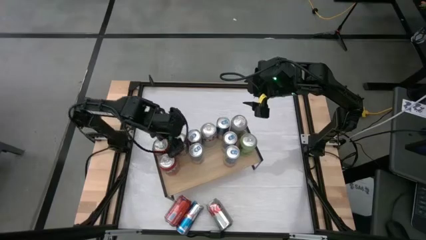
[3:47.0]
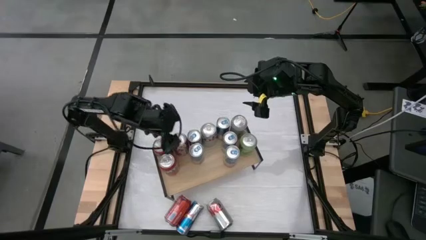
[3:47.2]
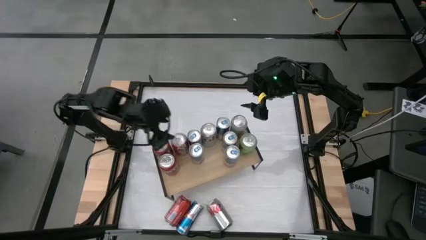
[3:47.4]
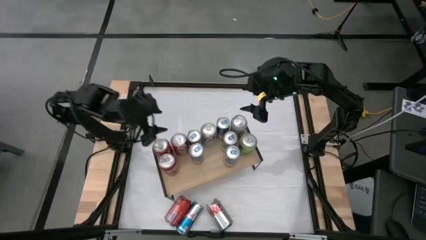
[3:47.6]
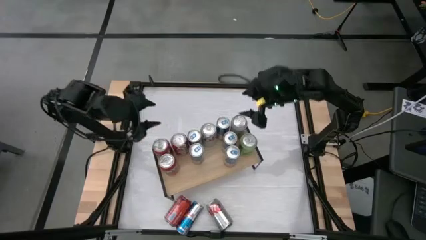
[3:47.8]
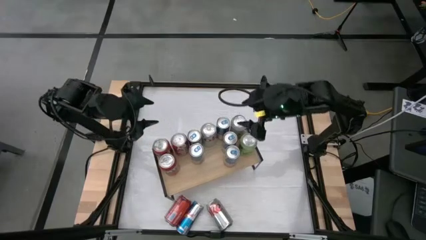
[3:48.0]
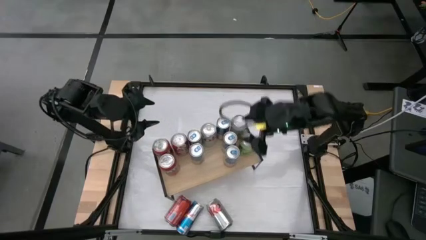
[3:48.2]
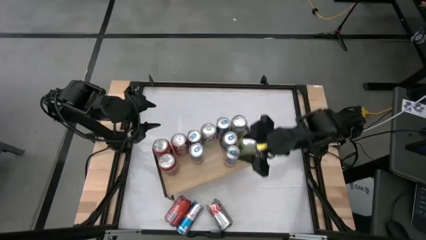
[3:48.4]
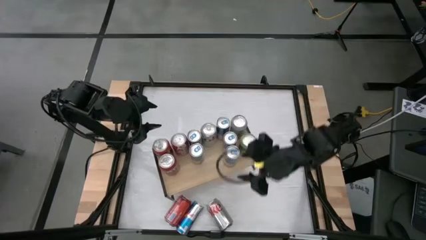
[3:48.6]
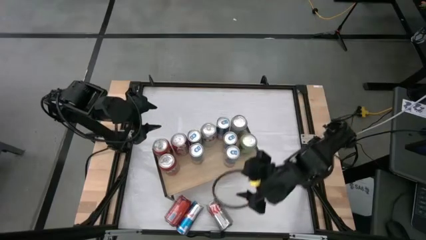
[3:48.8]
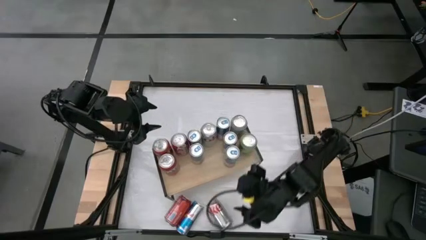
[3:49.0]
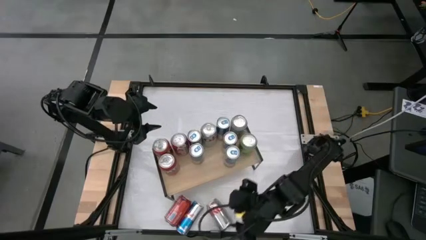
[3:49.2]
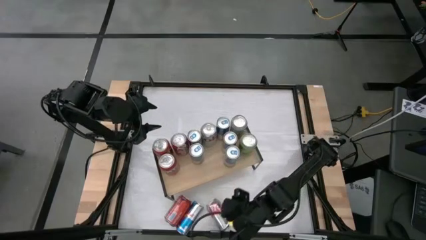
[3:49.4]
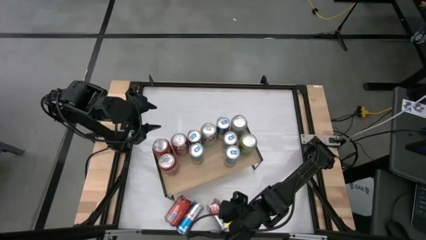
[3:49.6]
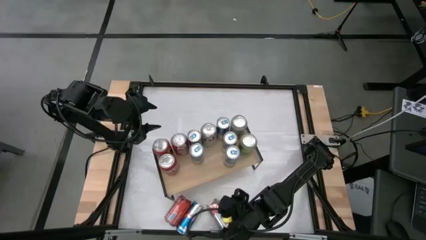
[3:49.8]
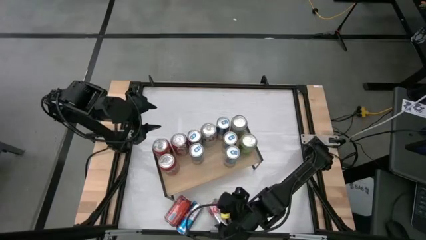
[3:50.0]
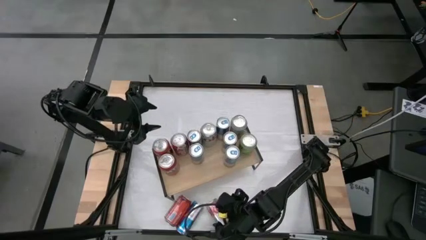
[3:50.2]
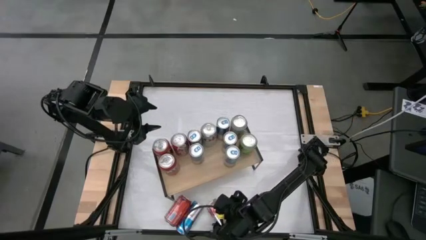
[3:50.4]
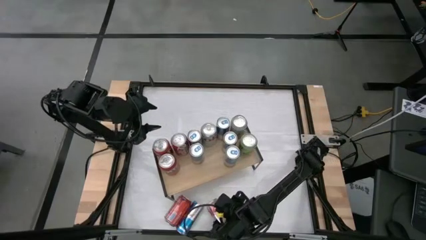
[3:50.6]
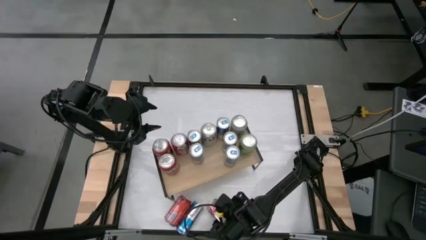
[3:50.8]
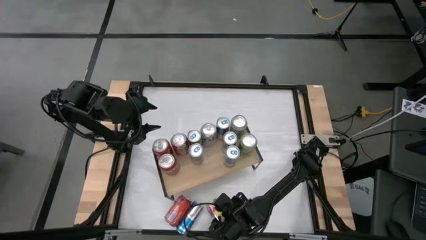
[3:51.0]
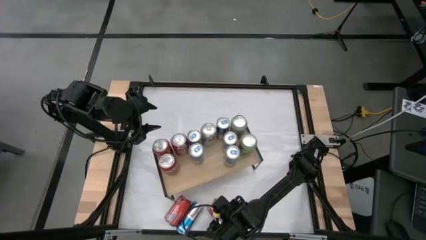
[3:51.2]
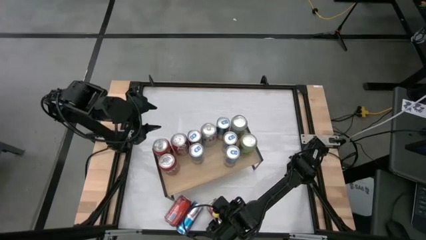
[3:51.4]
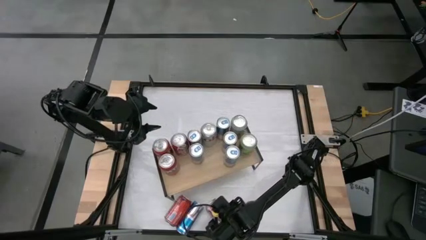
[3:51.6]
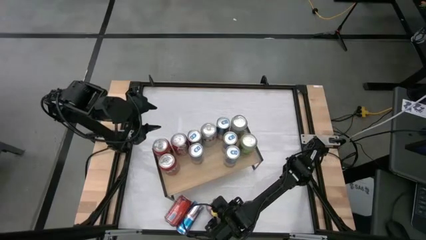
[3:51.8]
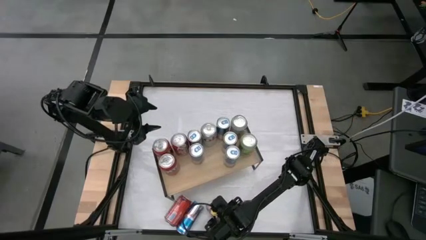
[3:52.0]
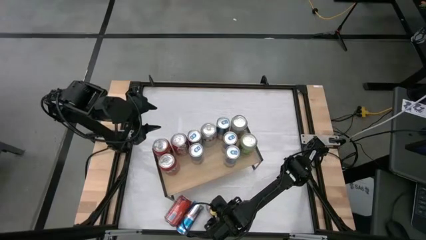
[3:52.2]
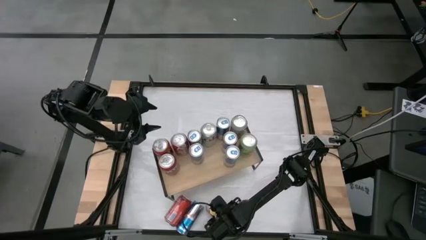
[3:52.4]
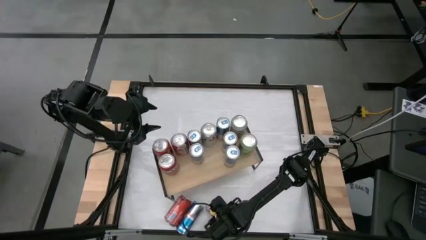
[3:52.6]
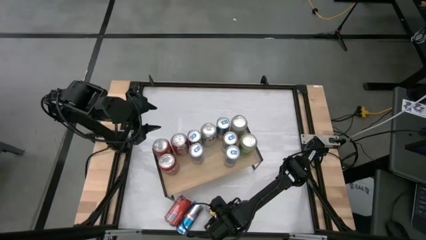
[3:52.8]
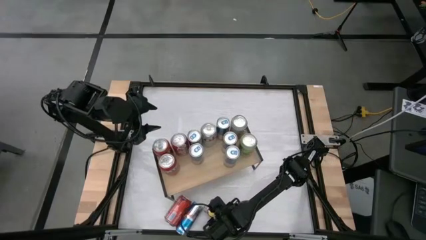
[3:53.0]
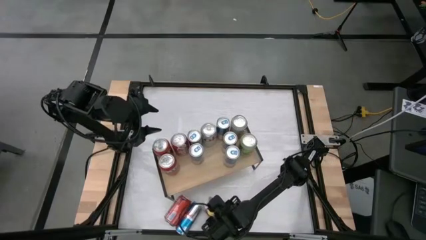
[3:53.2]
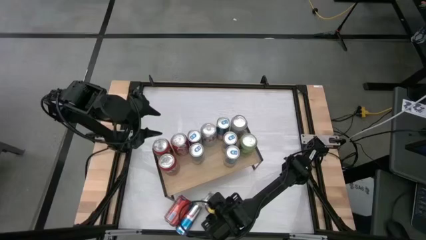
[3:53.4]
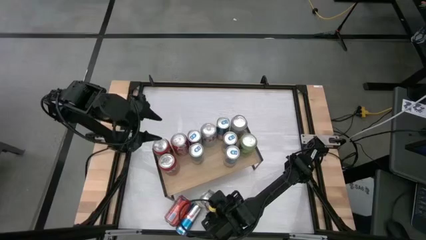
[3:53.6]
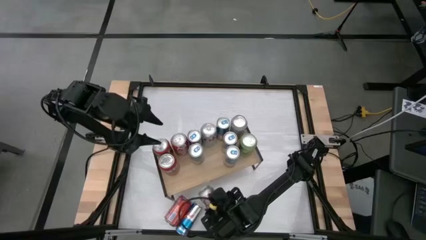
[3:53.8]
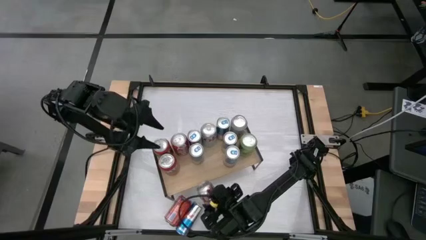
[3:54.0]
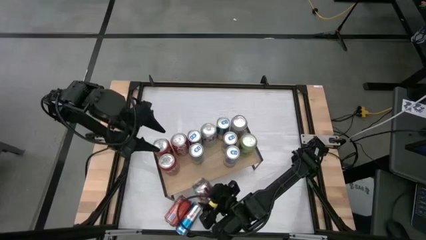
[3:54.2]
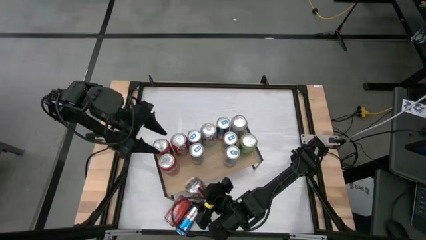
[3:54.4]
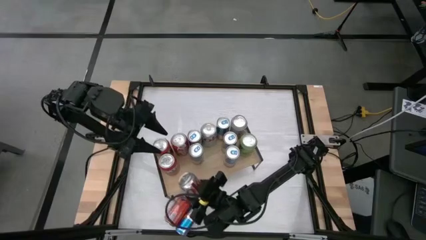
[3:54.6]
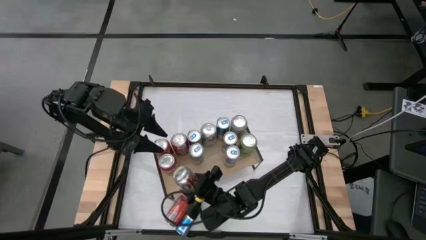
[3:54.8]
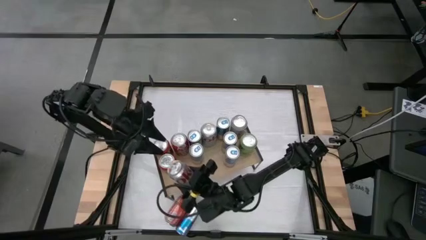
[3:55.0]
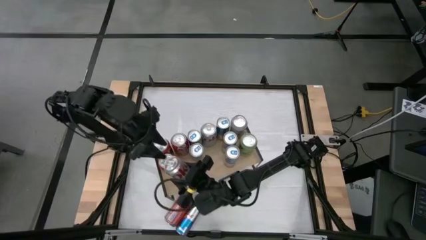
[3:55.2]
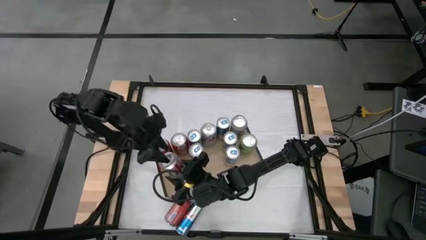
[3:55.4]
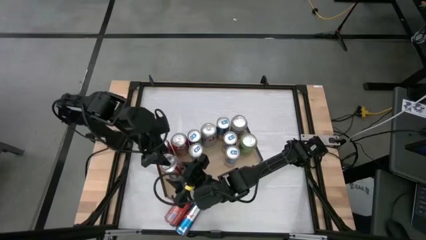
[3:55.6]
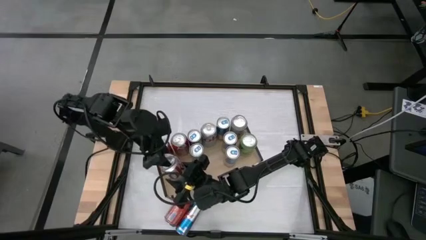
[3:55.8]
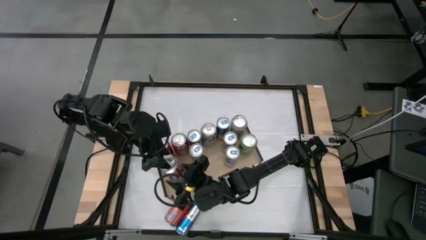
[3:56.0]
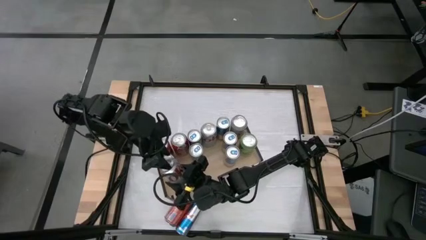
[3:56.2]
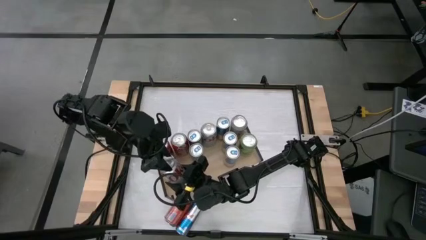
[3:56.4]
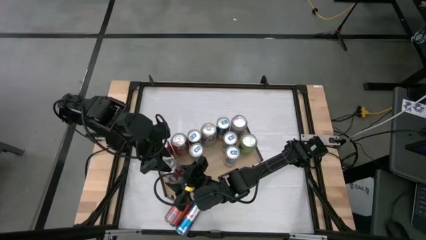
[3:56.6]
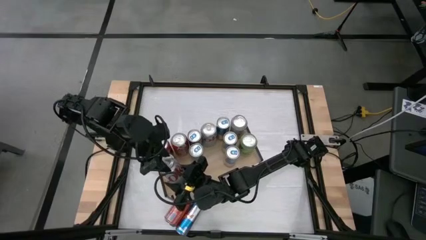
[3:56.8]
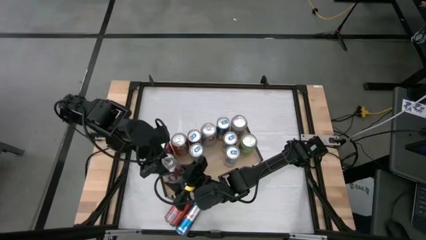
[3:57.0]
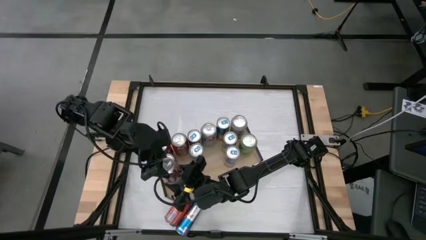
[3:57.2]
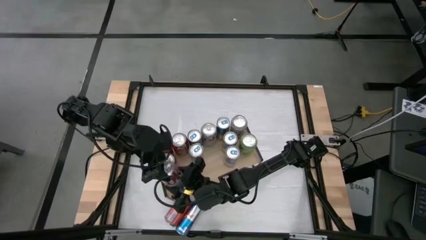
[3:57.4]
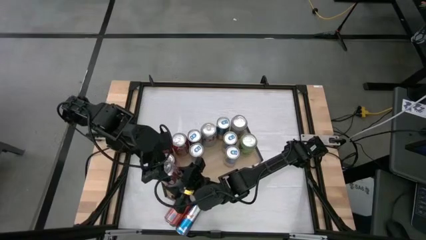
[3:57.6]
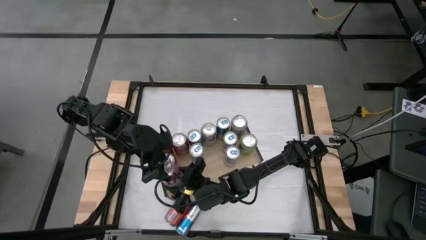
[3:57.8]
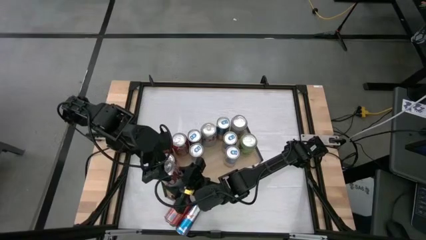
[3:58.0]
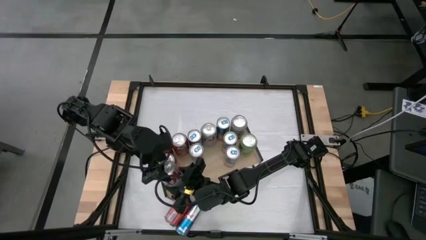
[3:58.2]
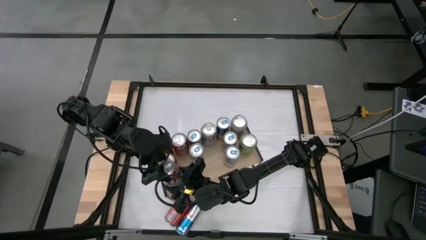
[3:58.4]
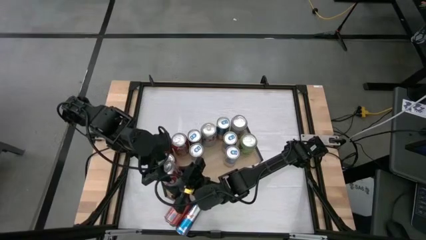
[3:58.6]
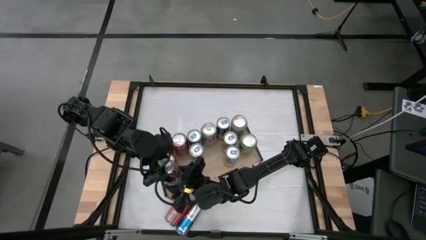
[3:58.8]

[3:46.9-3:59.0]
Task: Place canned beverage on shelf
Put the red silver soda can on the shelf

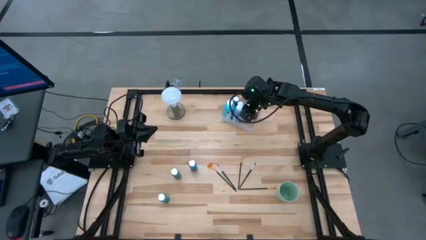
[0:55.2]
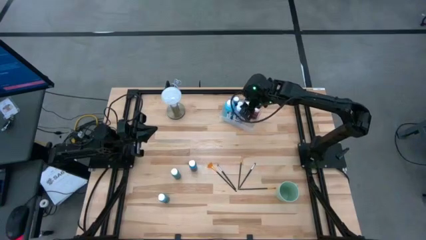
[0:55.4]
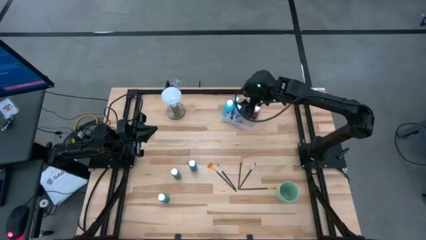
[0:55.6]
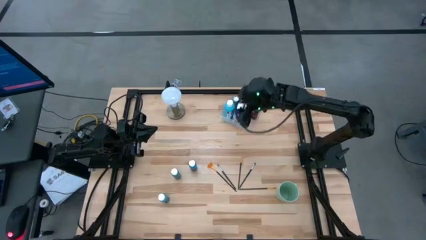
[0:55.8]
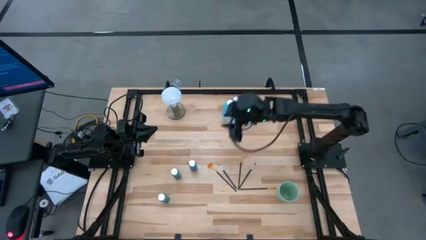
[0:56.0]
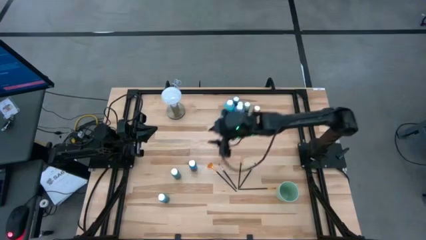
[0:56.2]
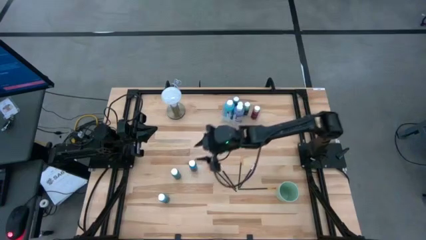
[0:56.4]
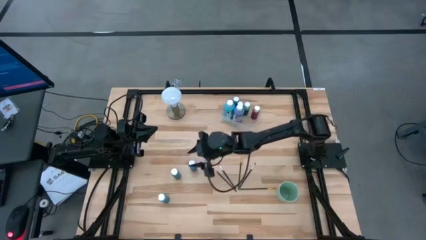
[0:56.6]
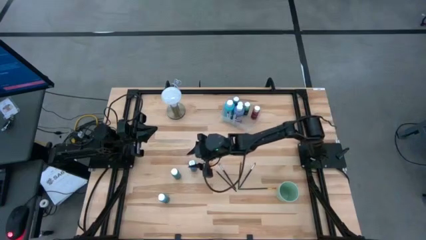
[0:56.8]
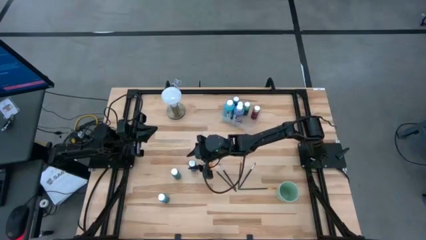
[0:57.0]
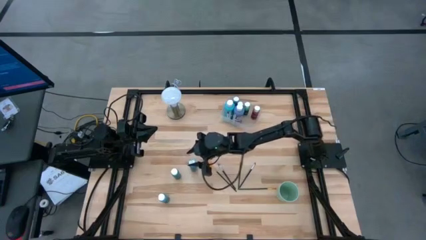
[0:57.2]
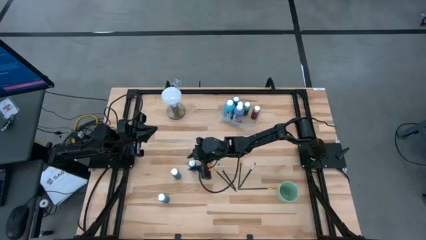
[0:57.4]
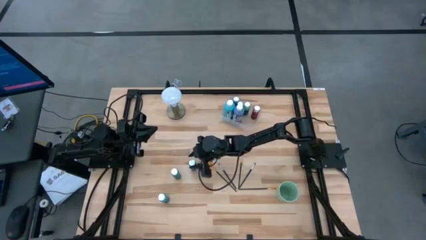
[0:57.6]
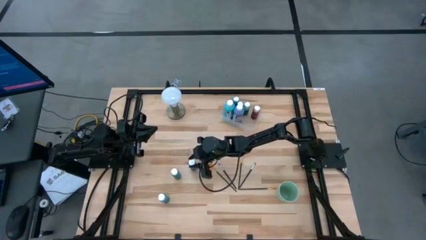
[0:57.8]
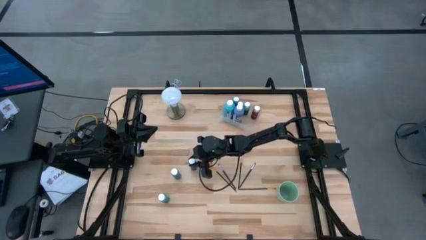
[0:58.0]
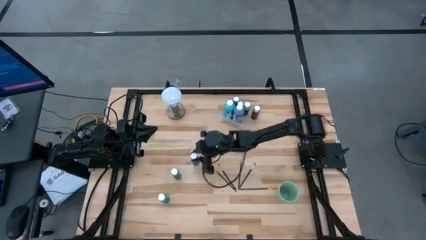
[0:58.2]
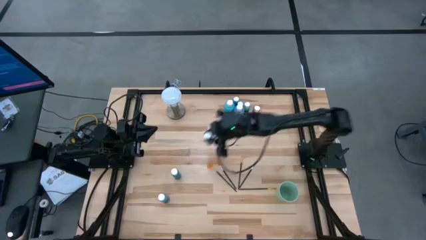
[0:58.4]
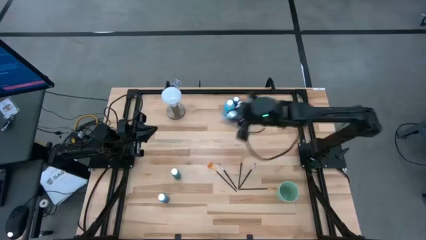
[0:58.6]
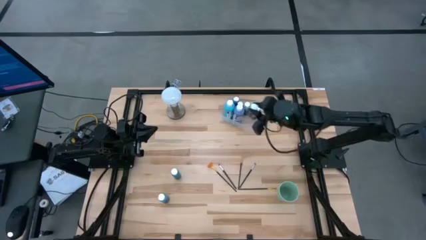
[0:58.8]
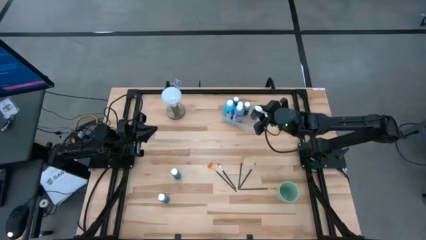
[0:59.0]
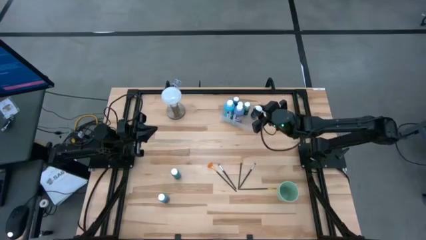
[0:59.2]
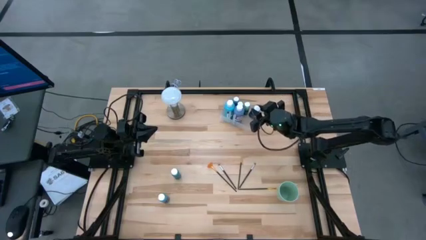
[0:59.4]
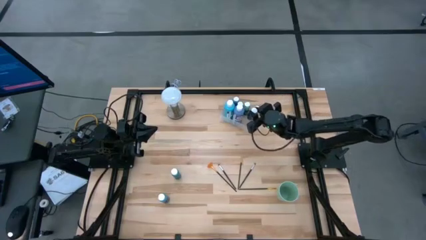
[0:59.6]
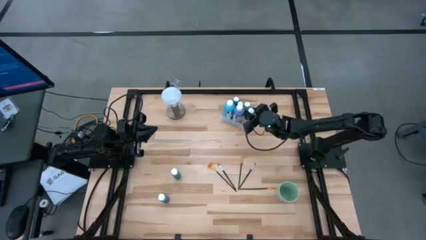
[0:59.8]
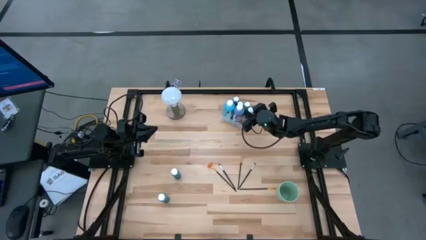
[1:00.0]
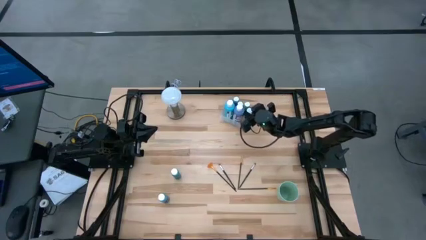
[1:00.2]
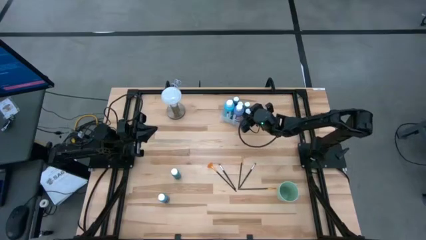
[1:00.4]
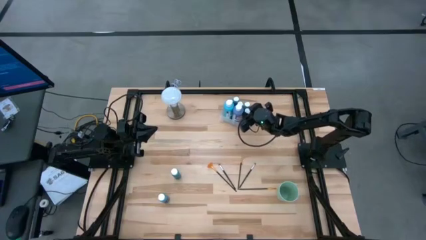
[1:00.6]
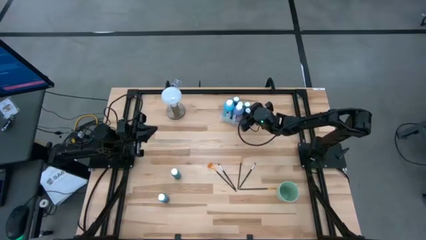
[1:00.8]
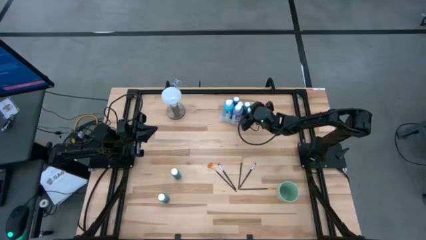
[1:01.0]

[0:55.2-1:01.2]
Task: Pick & Place Paint Supplies
Put the small blue paint bottle into the transparent bin
